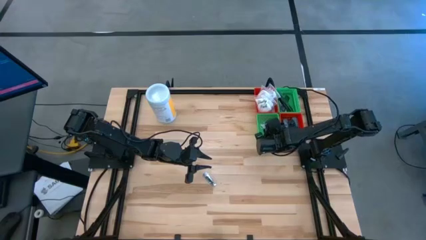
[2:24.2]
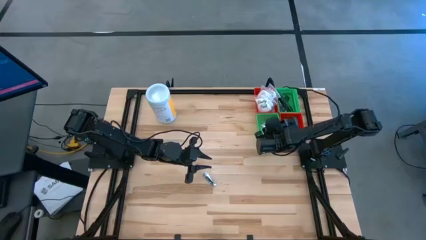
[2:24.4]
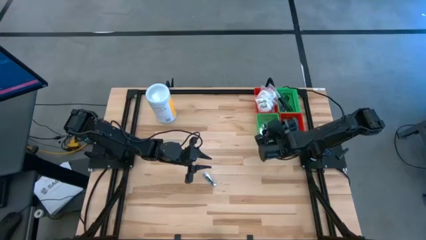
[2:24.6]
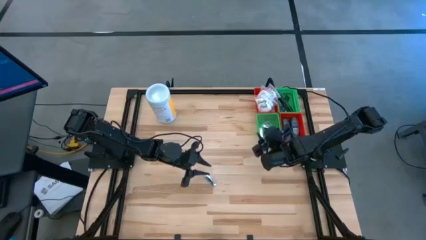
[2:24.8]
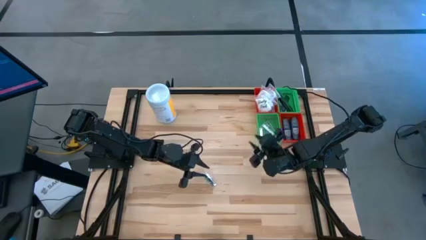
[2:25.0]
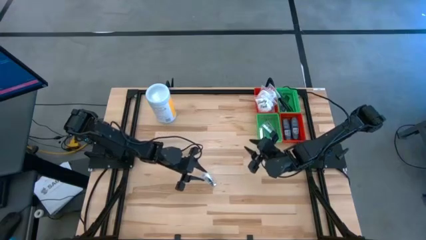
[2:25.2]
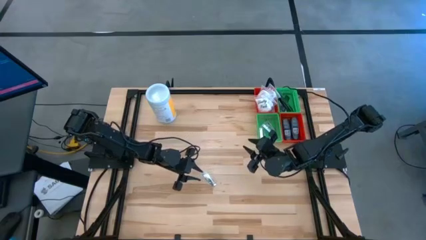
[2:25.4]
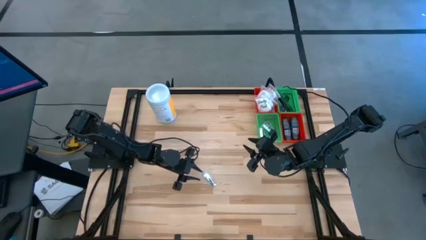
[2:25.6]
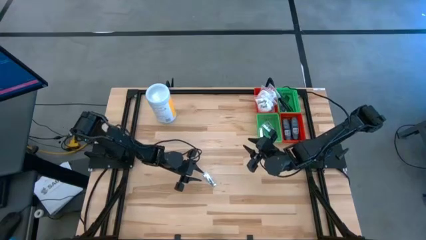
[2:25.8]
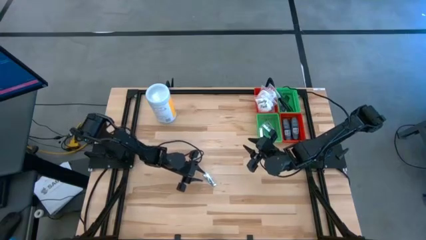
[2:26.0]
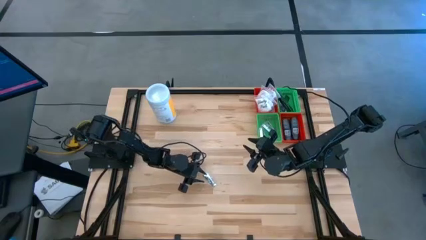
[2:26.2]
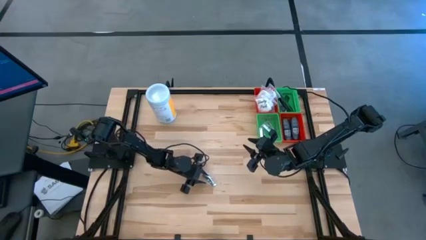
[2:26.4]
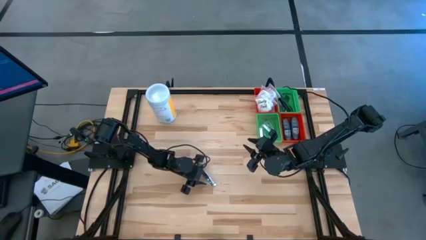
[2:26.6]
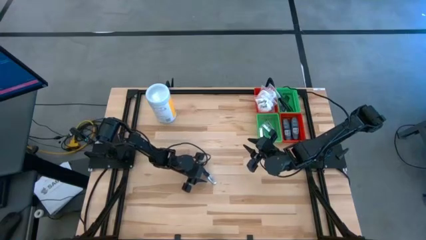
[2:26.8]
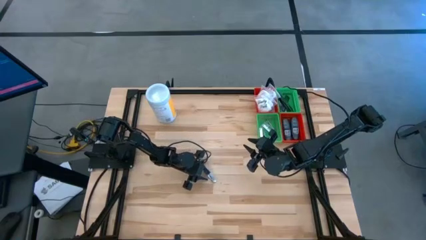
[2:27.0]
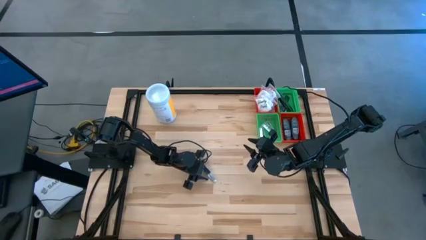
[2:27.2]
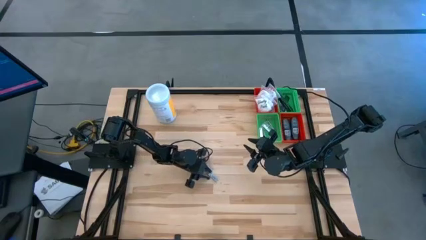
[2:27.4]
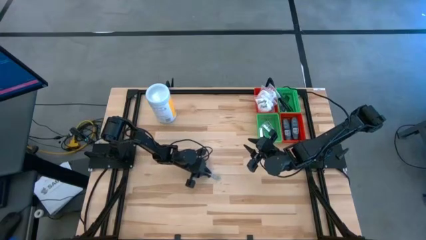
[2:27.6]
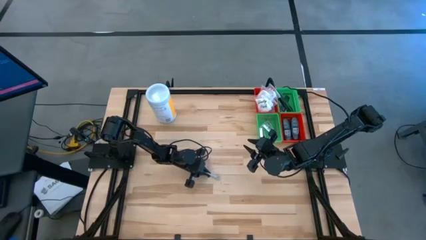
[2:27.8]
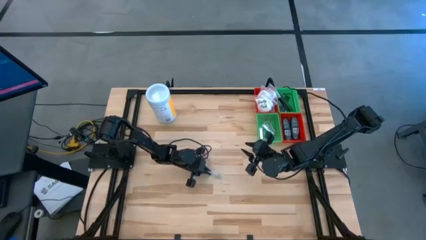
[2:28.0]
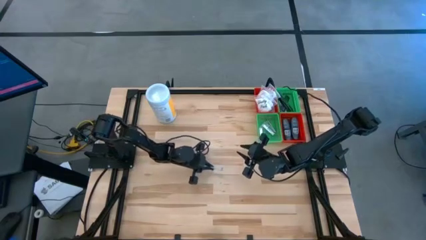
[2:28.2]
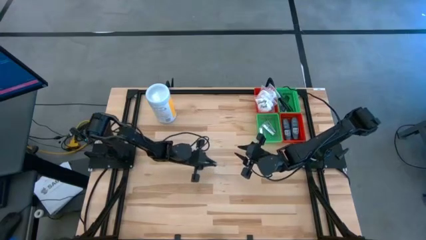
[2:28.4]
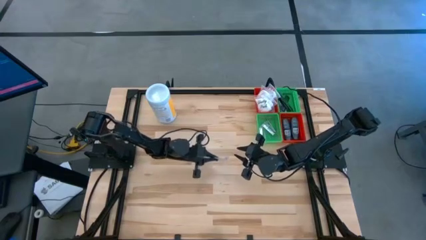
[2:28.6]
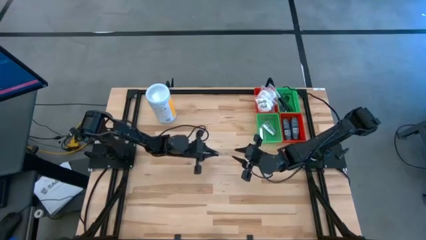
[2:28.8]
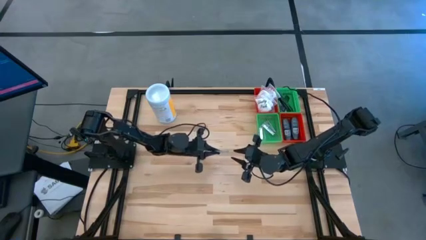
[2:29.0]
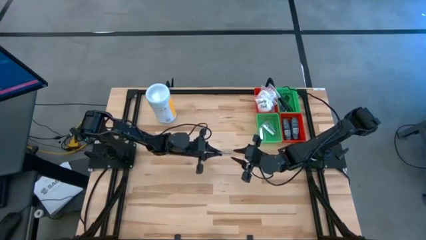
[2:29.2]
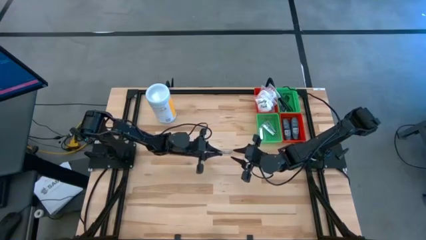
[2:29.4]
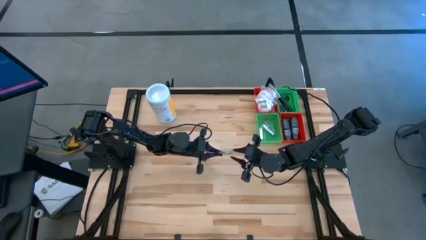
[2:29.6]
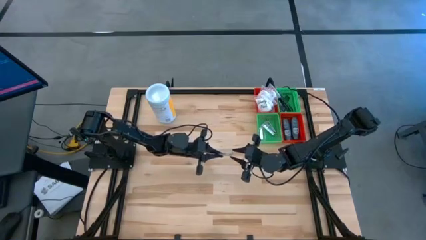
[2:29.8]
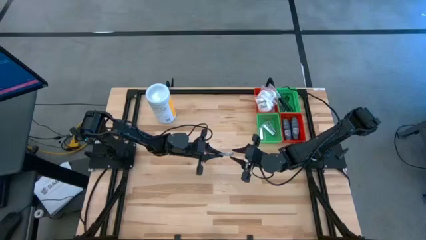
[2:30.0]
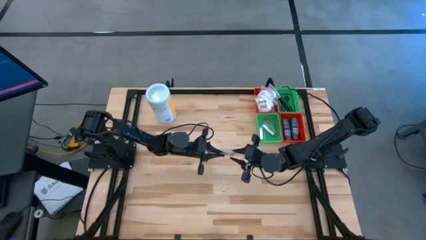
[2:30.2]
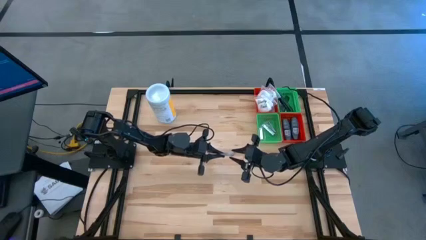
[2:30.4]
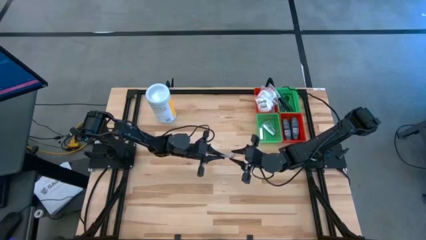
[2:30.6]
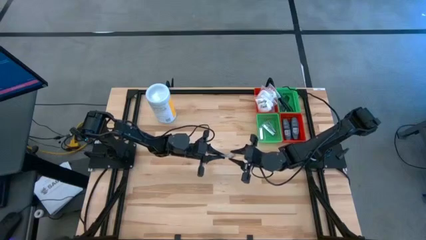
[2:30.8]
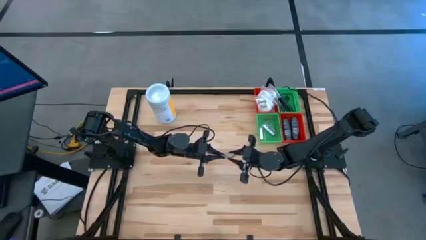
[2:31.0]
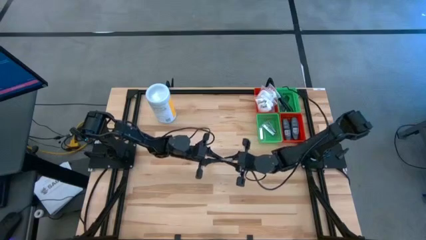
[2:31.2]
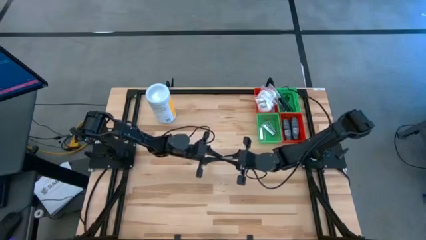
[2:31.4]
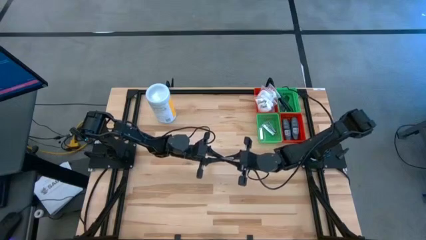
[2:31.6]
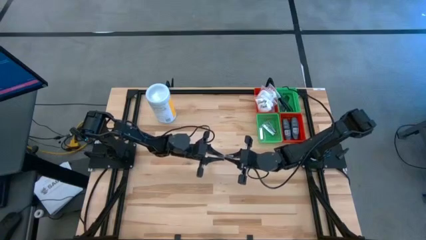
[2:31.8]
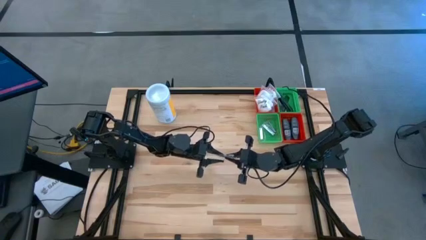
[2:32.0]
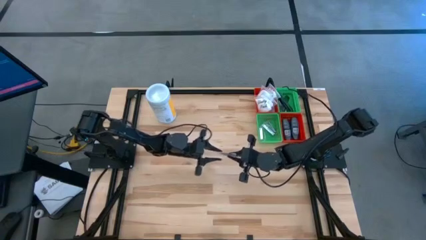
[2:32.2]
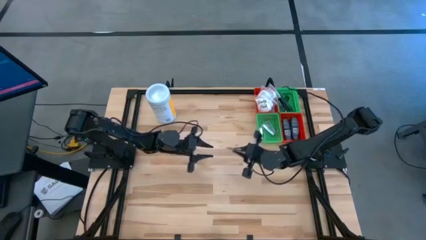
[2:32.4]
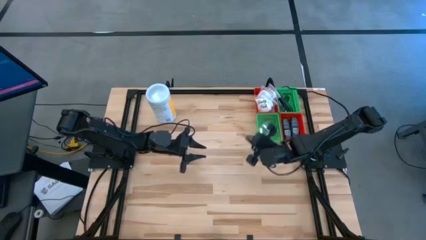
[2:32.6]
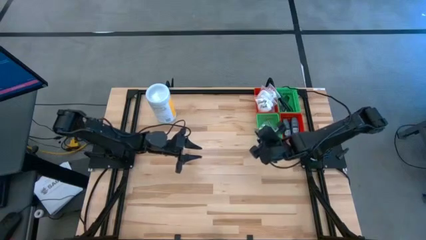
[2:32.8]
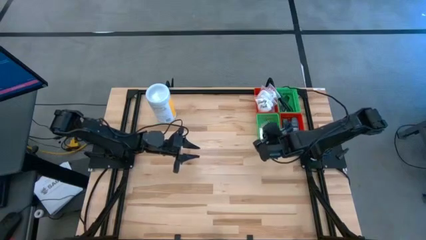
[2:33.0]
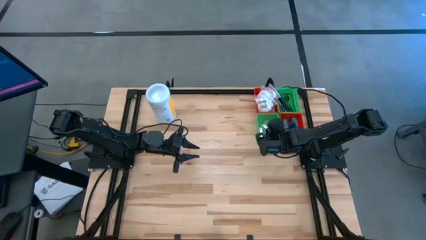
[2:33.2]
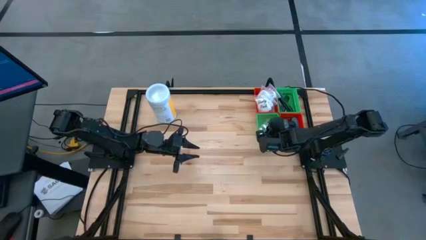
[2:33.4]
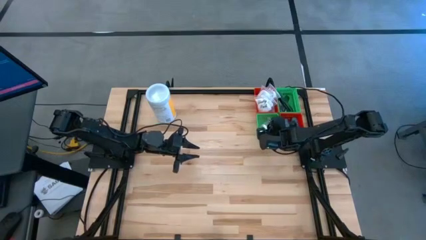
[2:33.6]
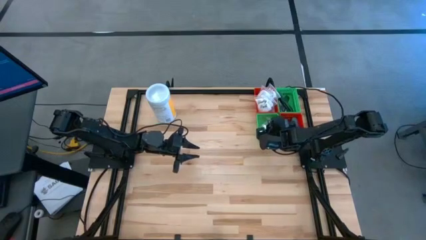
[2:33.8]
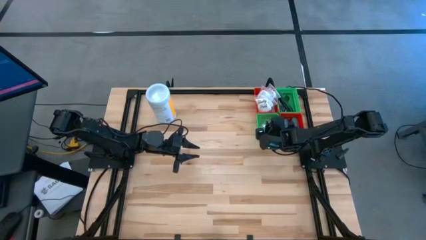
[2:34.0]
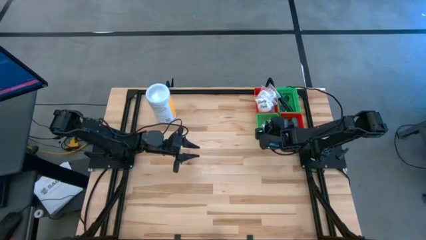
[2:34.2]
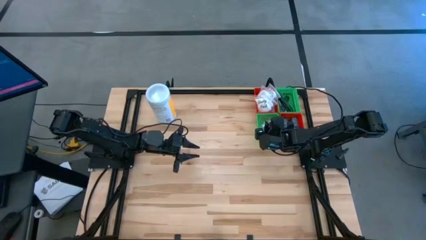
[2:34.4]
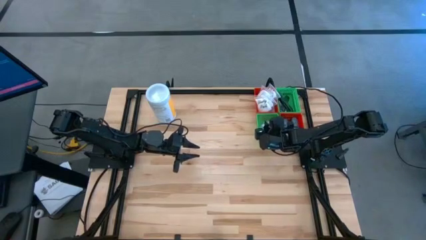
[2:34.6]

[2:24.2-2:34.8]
Task: Pick & Place Travel size toiletries
Put the silver nail cutter into the bottom green bin

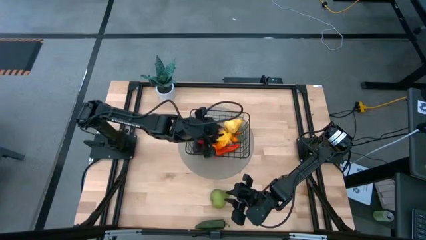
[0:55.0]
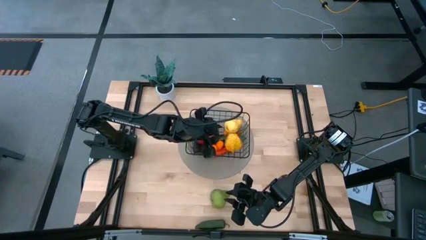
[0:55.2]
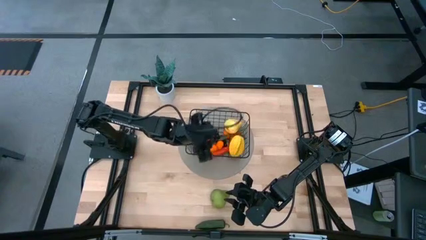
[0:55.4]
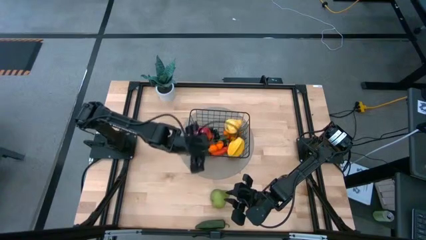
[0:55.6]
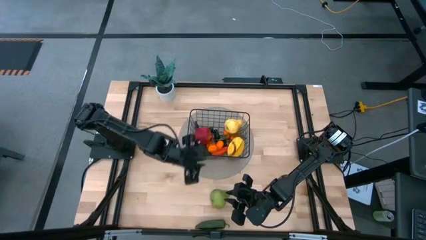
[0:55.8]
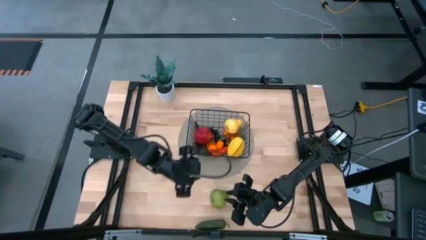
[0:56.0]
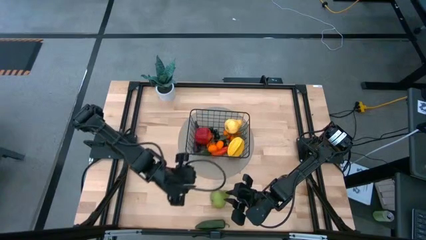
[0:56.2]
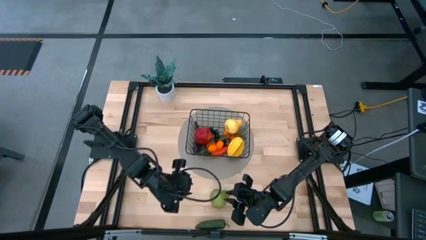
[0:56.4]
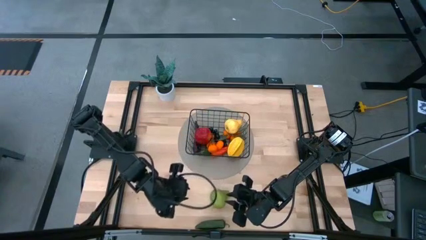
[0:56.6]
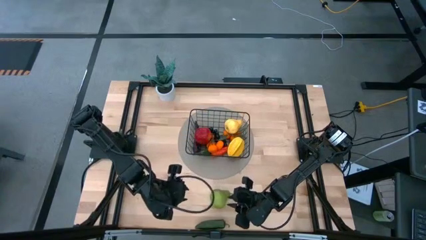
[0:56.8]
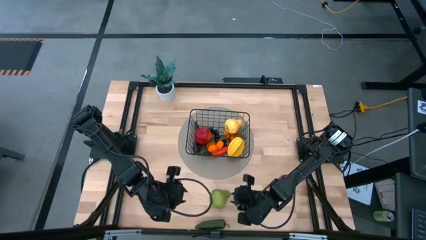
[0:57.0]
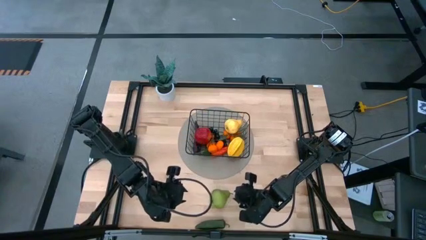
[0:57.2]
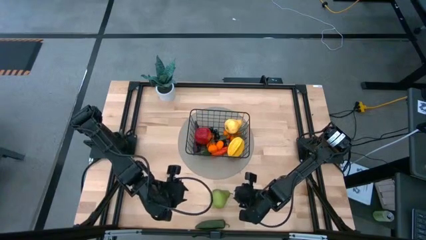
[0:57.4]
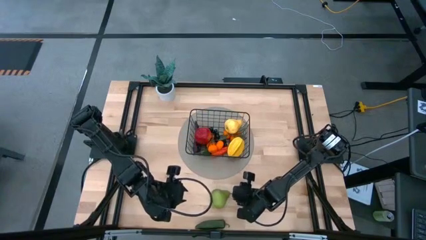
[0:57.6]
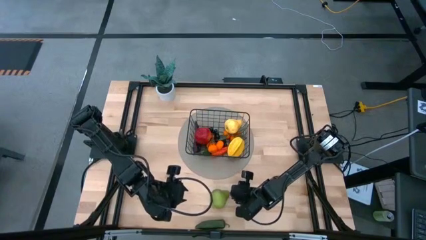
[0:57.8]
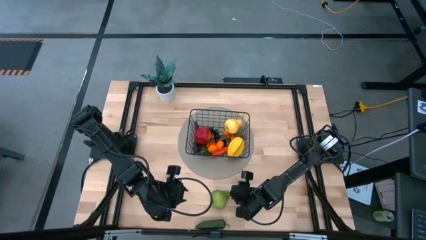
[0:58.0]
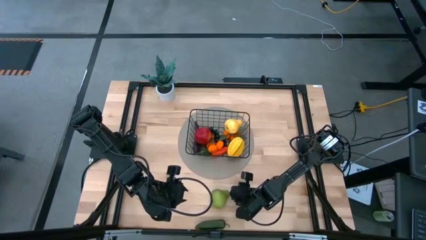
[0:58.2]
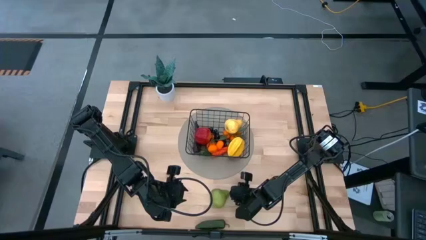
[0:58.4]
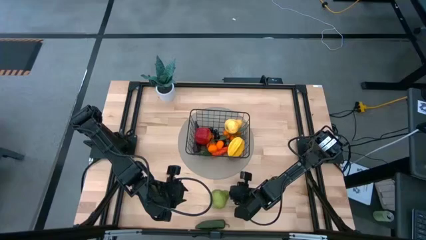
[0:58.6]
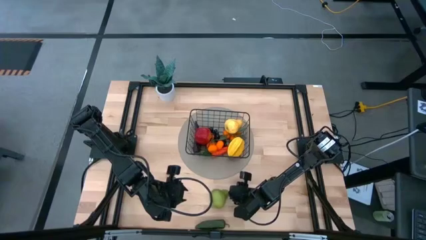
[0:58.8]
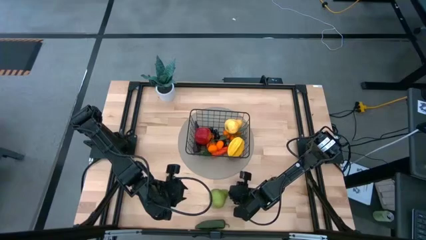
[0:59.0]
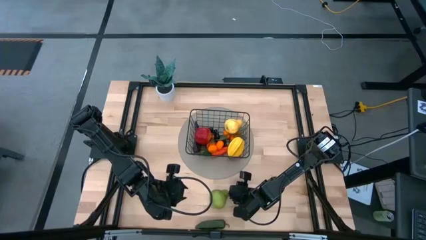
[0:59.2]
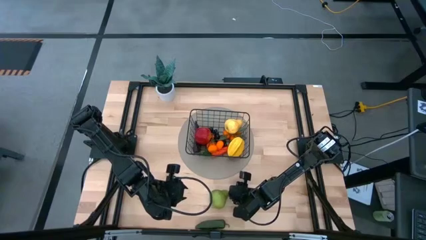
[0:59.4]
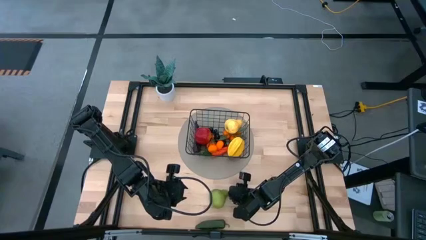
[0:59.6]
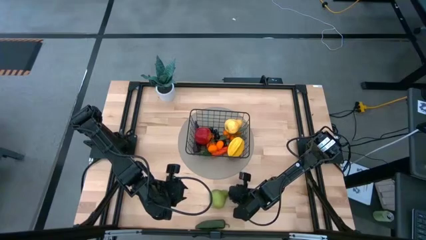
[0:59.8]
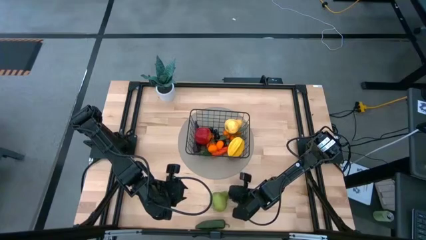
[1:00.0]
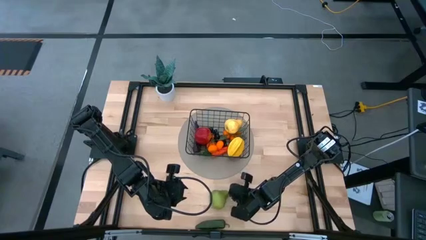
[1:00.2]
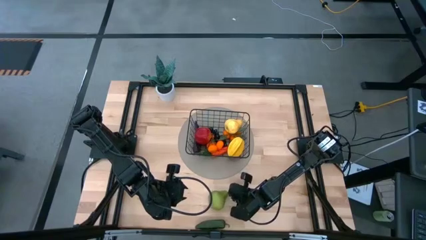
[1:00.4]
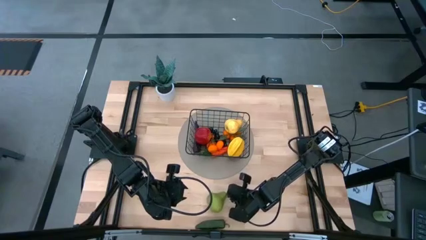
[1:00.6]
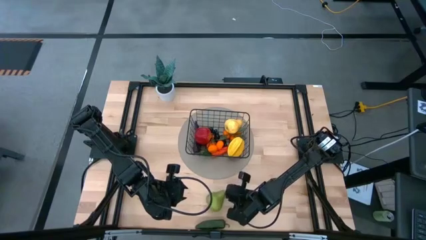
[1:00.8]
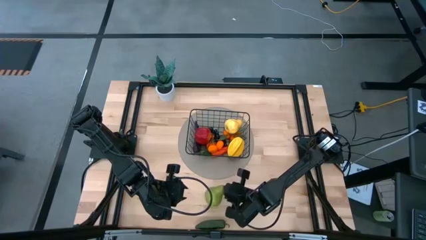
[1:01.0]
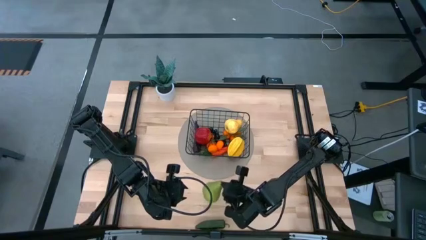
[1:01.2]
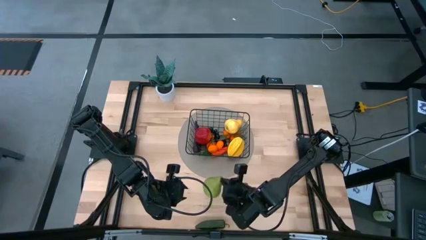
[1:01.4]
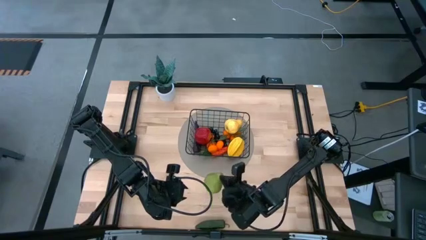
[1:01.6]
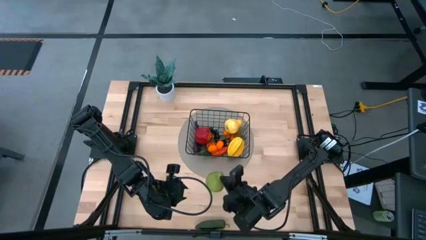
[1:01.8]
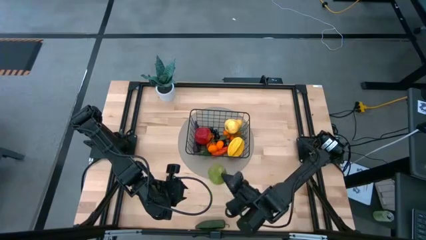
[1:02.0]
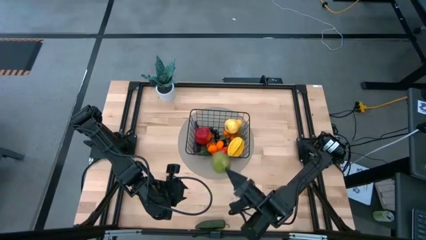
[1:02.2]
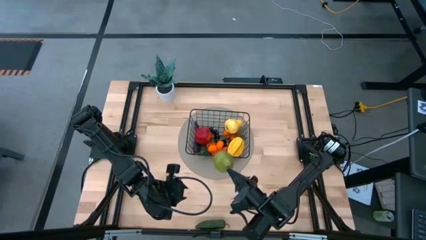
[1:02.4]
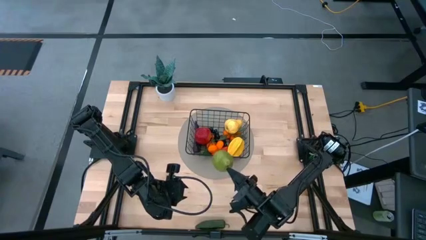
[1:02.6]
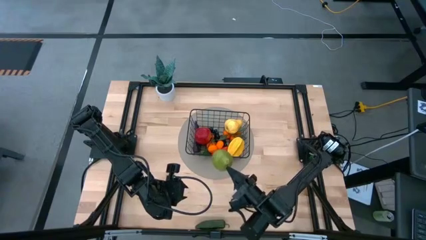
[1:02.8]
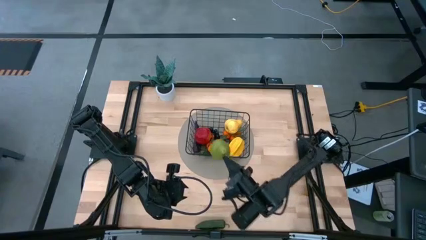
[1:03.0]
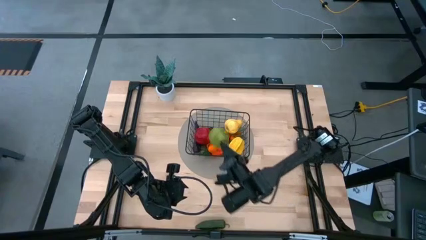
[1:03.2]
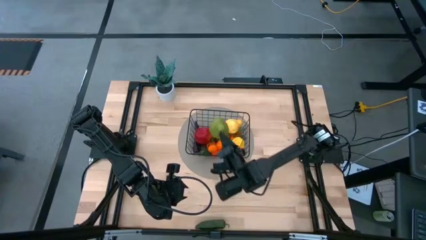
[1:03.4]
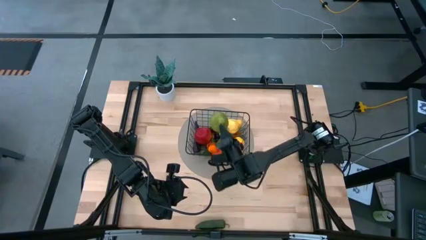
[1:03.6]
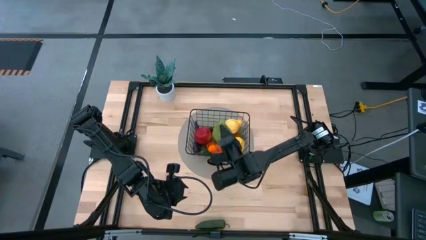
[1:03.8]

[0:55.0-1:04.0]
Task: Build produce basket
Put the green pear into the black wire basket
